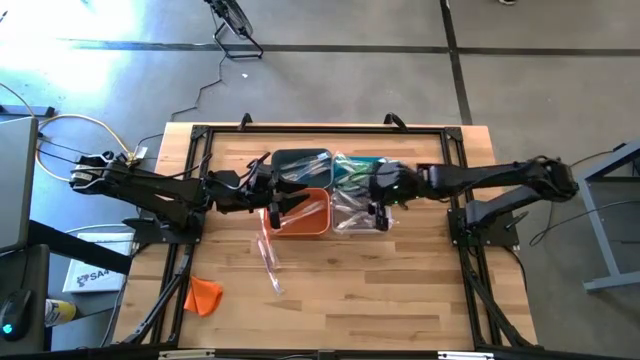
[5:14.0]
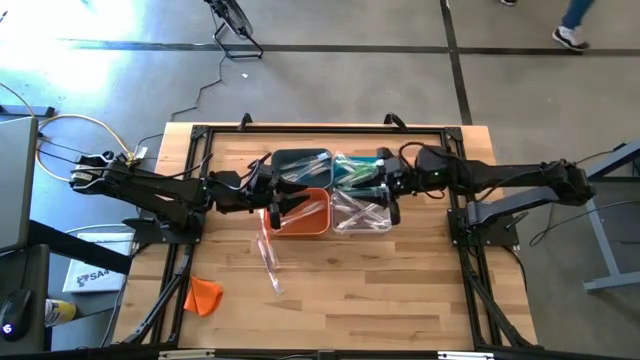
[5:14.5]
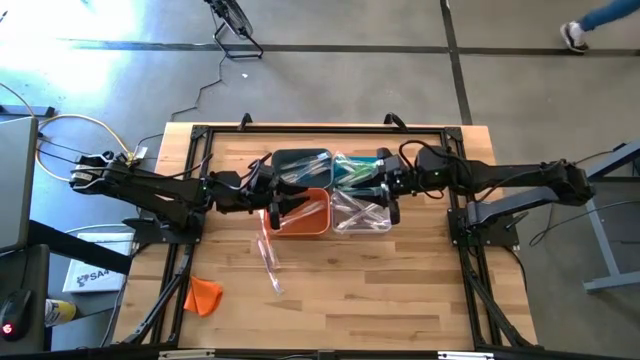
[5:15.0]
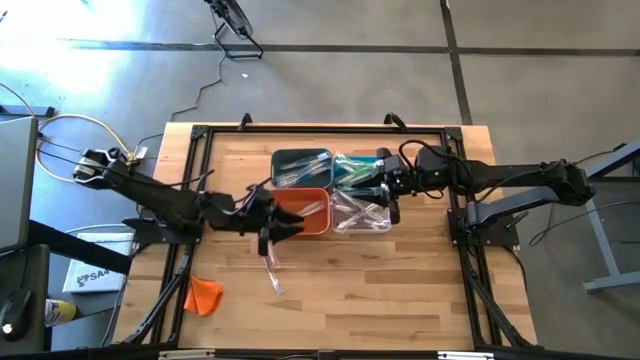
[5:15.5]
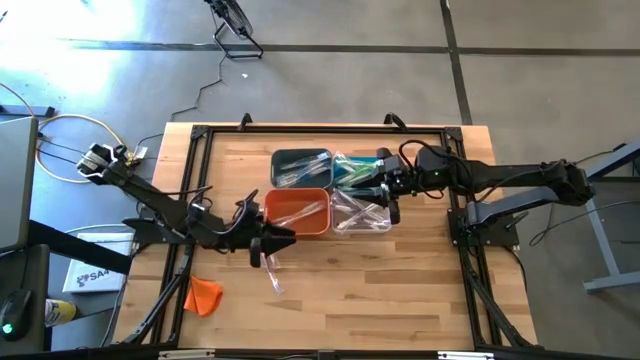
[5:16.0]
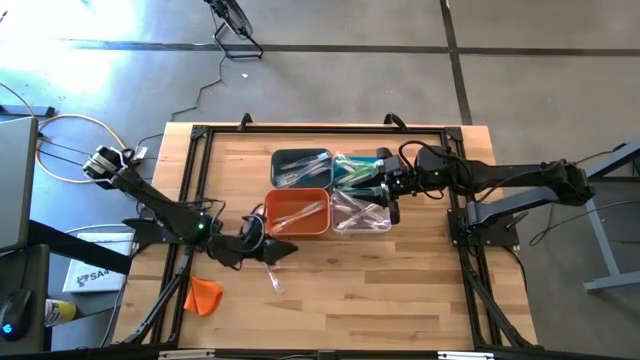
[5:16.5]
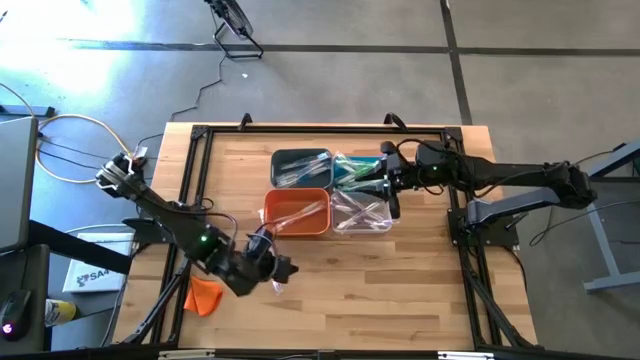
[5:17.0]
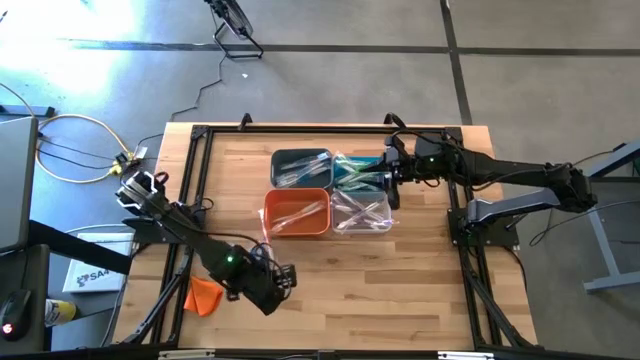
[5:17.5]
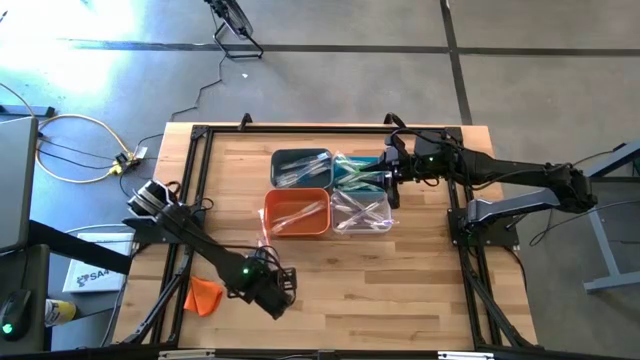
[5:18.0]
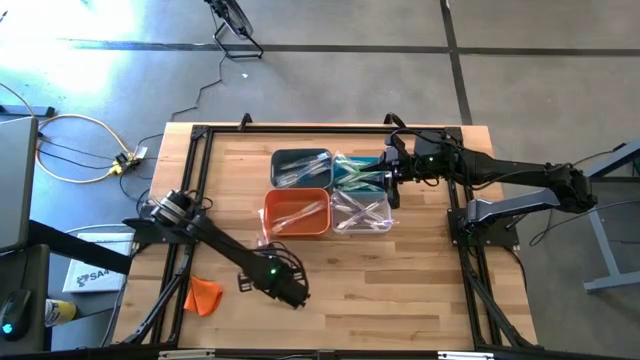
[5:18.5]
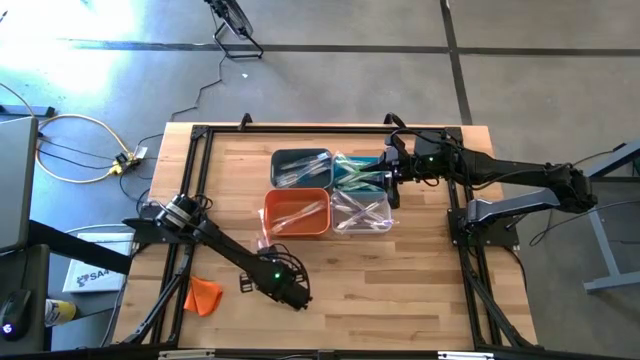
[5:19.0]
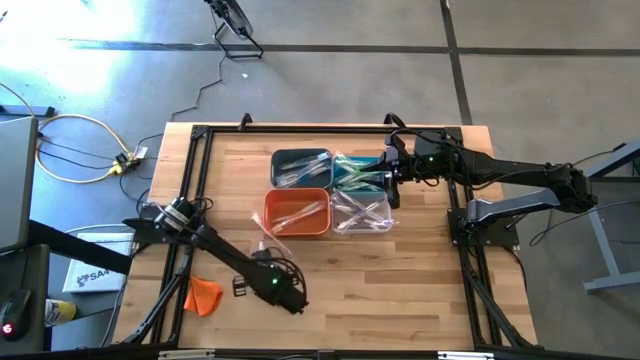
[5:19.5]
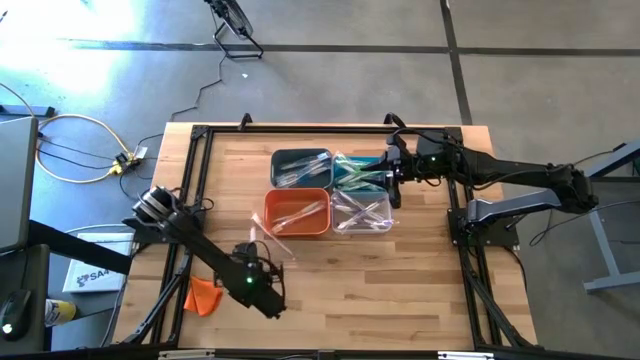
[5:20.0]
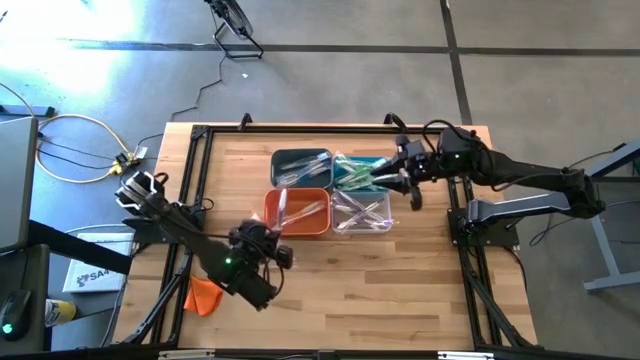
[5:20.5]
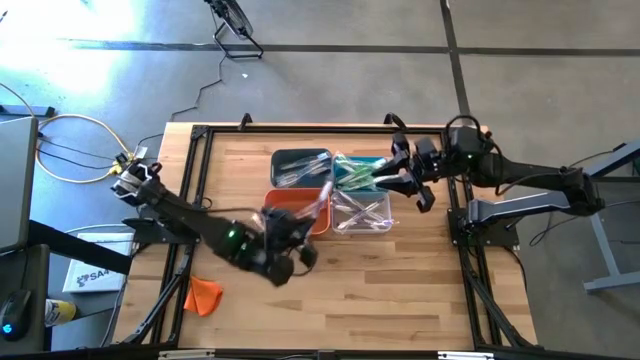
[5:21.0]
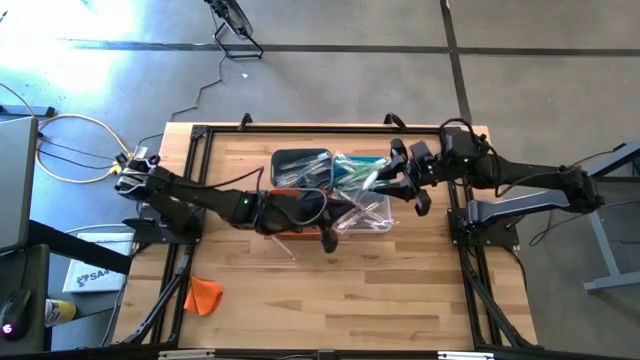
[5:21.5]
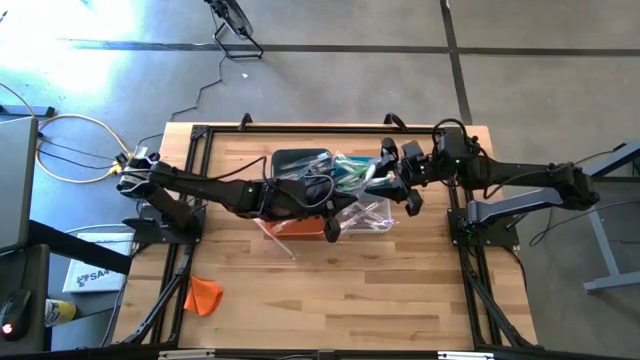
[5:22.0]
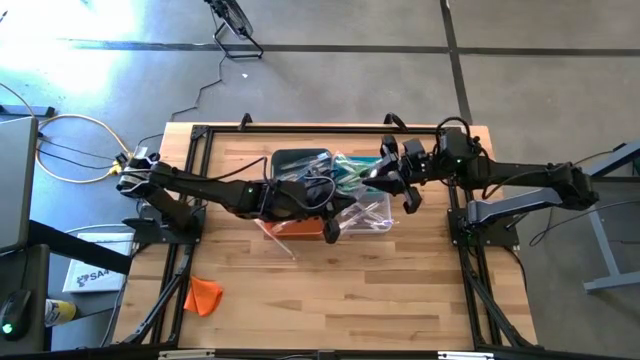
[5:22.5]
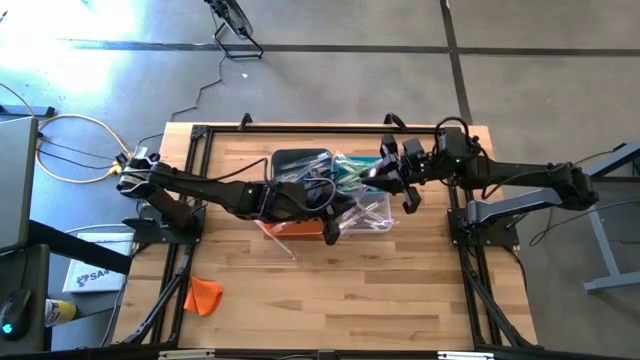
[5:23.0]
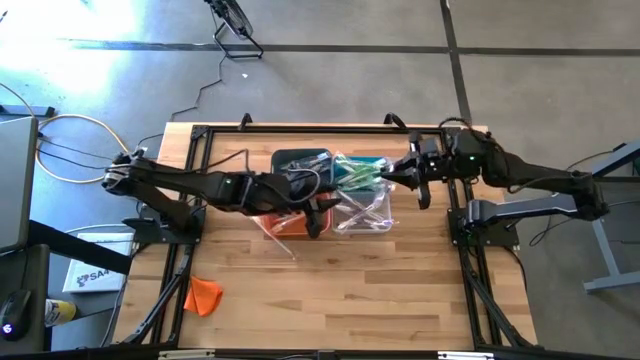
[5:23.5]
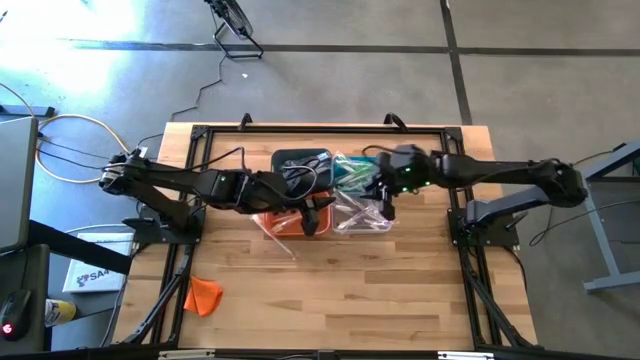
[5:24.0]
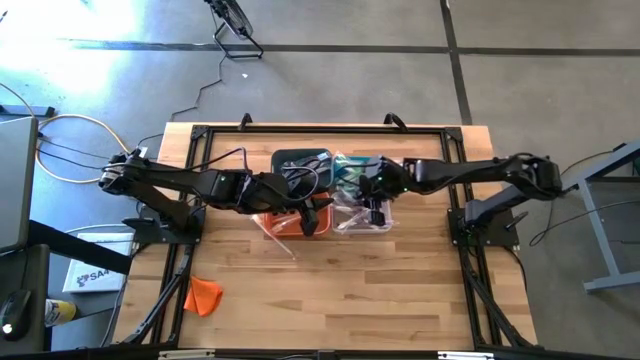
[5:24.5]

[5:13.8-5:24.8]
Task: Pick & Place Toothbrushes
Put the purple toothbrush into the transparent bin

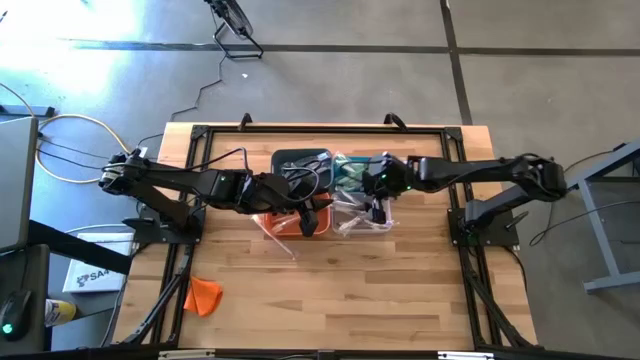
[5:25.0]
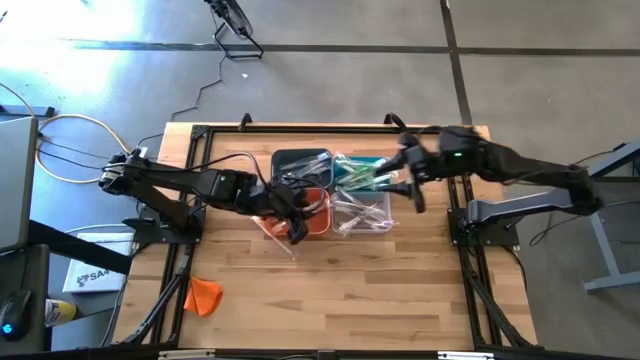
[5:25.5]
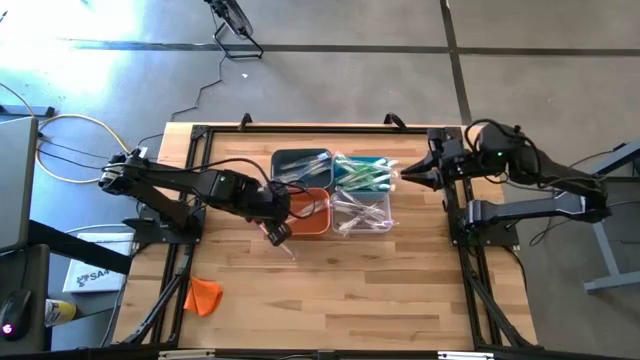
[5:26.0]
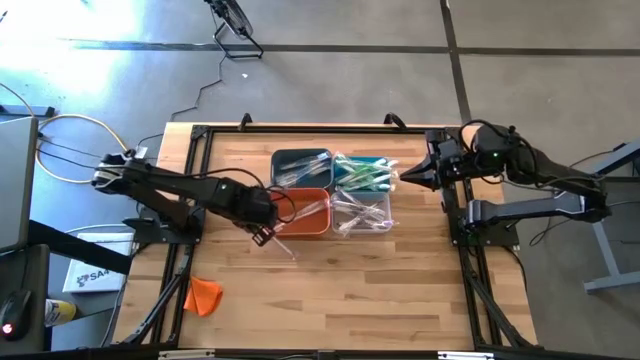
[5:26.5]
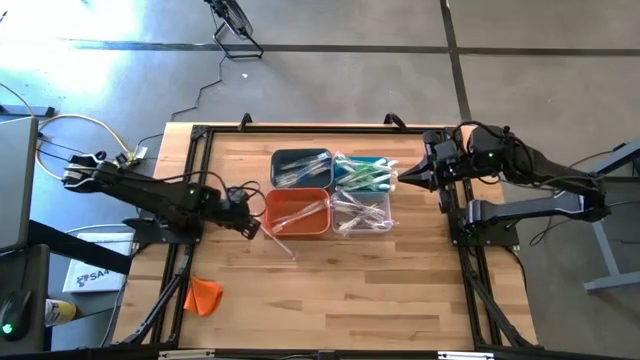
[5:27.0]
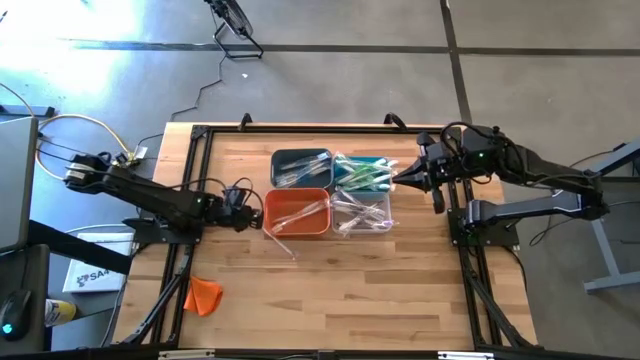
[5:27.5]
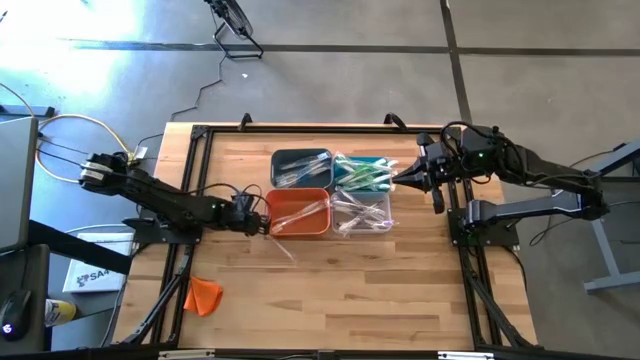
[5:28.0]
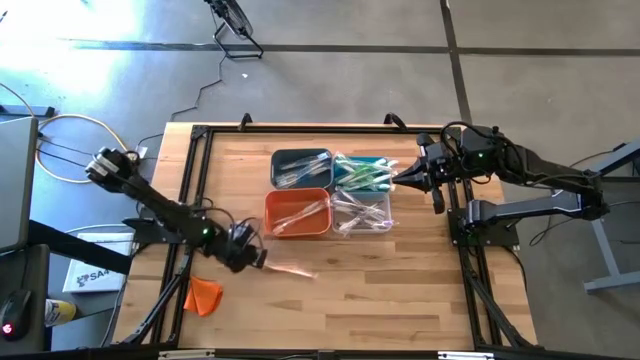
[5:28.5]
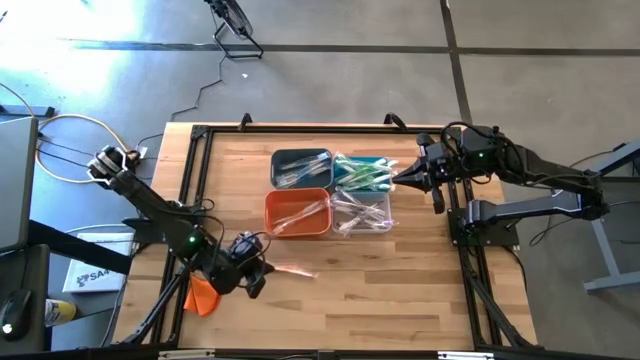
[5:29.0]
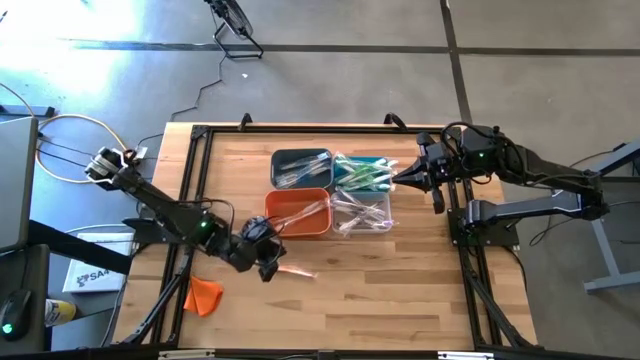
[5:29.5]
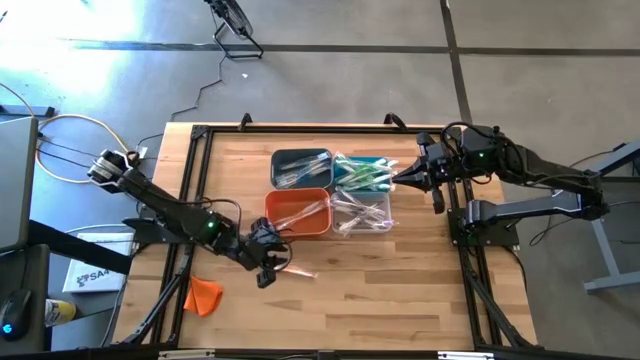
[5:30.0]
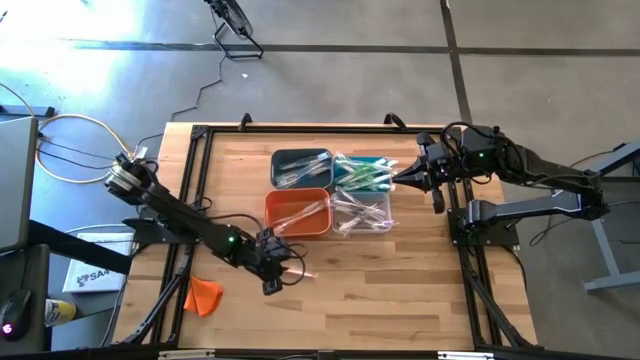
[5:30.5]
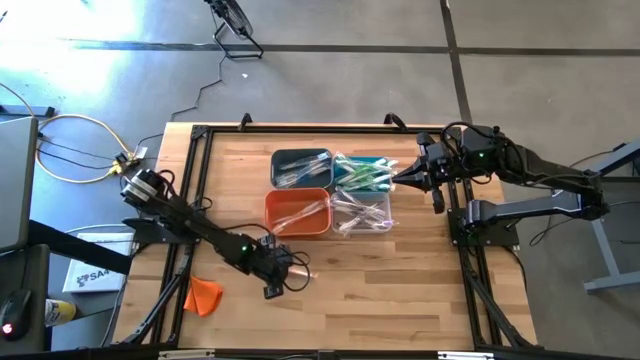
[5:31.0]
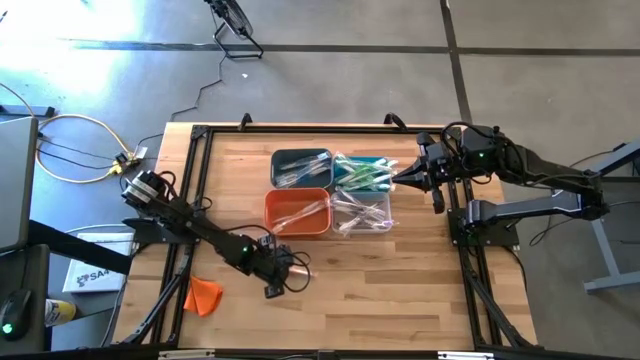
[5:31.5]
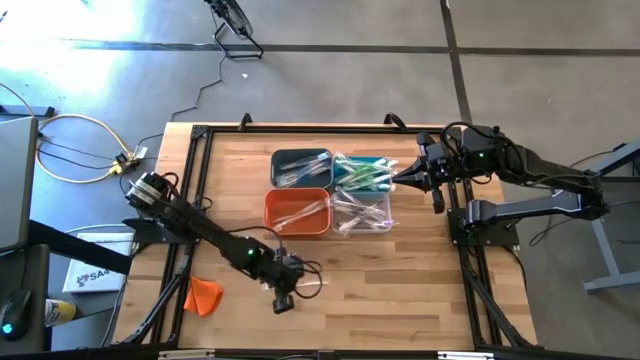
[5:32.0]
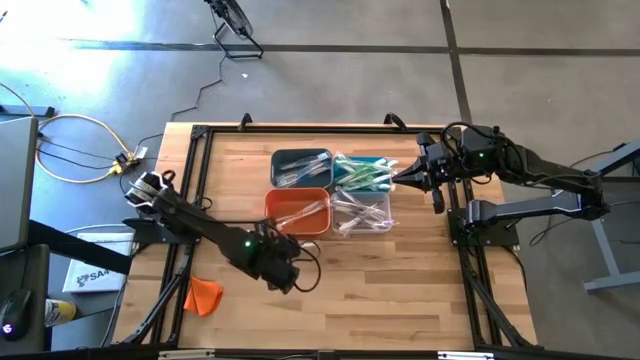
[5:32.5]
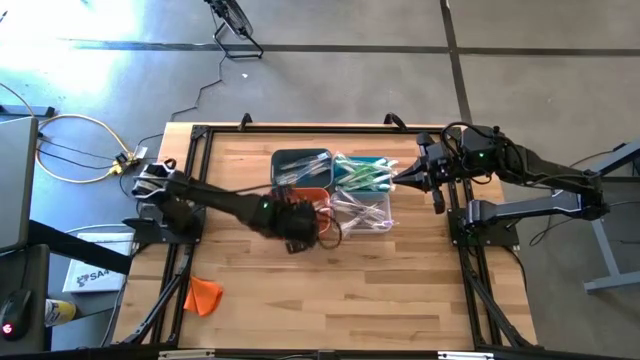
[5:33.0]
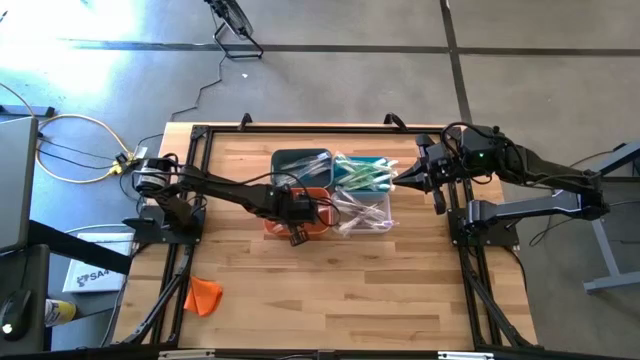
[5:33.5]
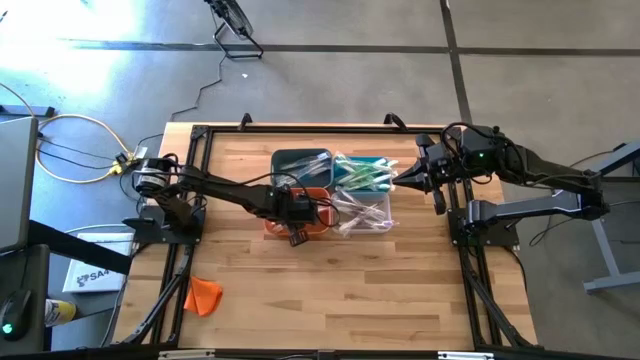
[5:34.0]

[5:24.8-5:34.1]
Put the orange toothbrush into the orange bin
